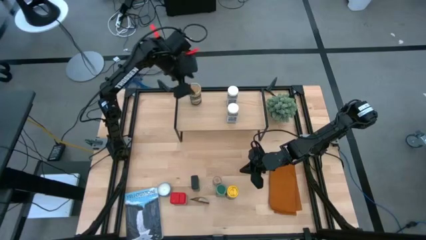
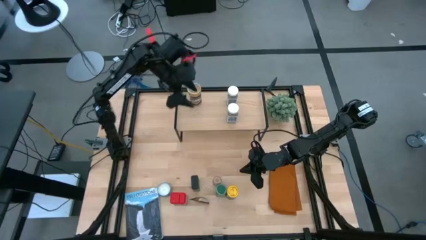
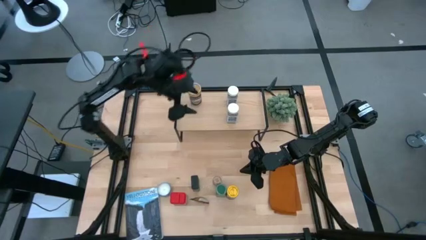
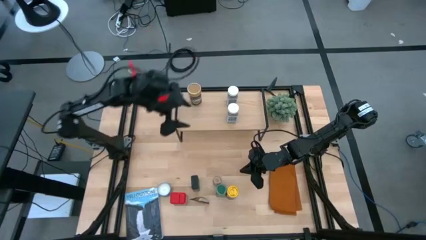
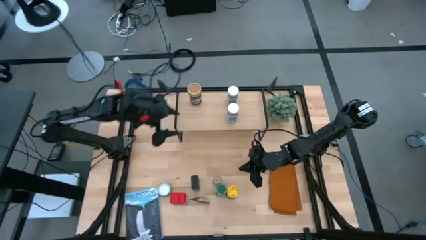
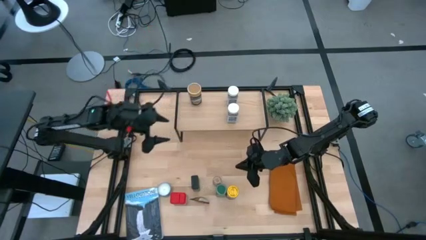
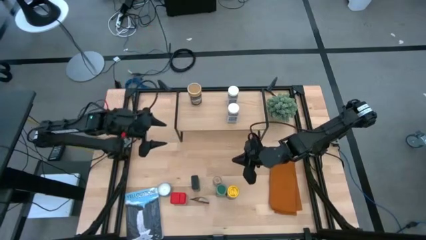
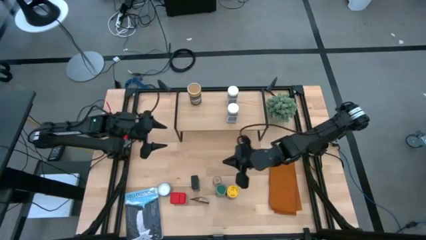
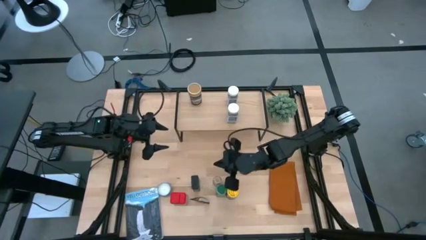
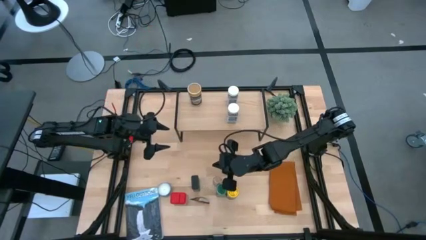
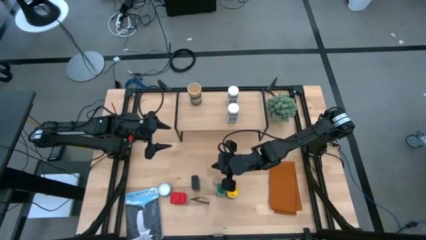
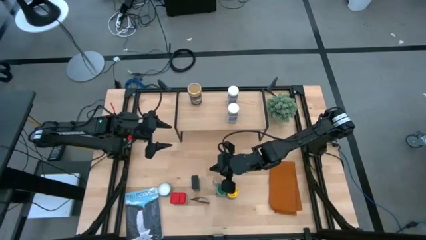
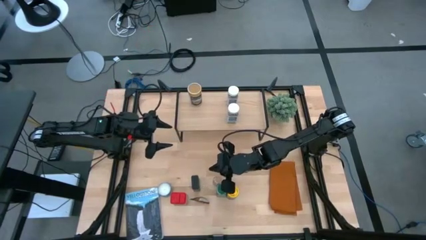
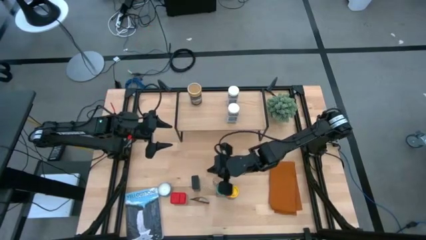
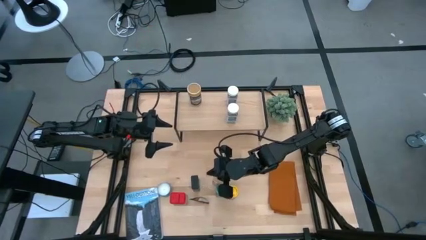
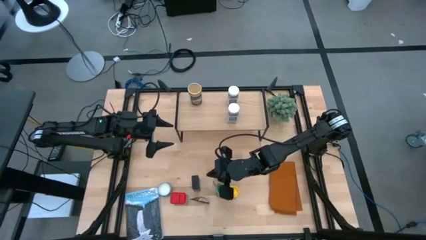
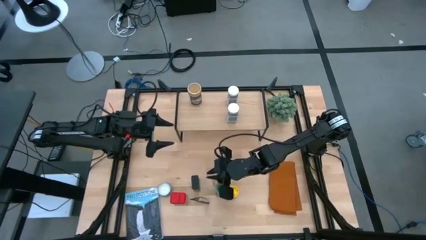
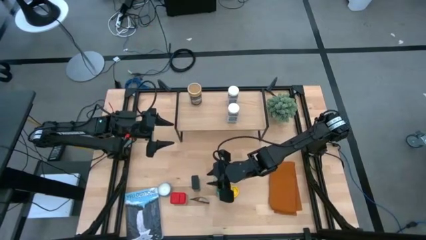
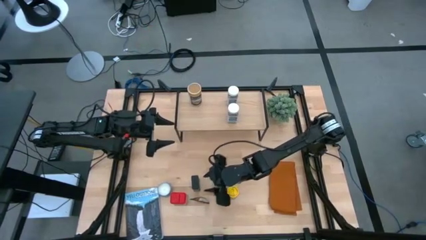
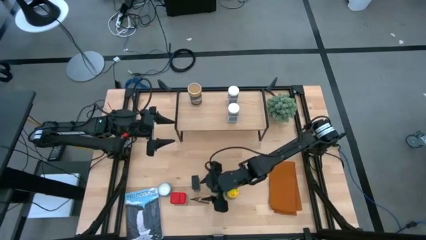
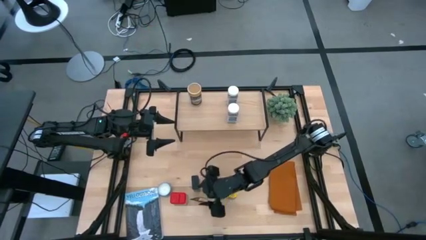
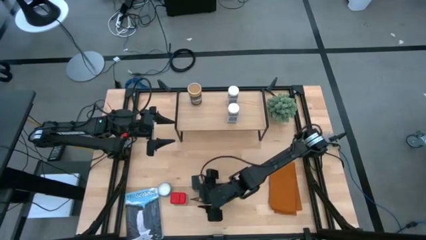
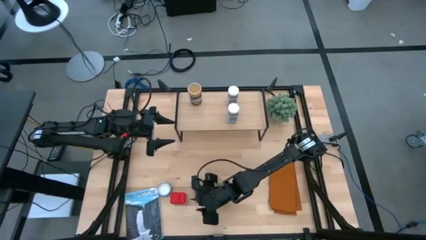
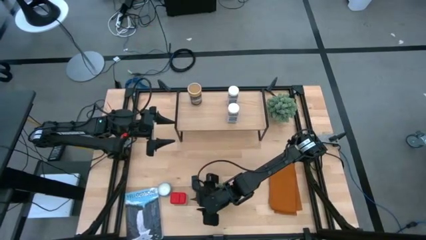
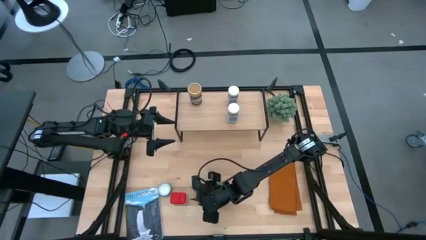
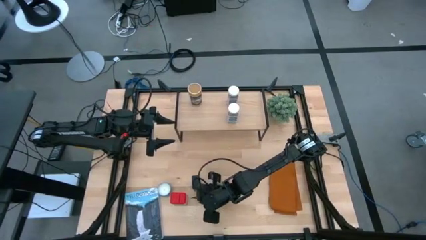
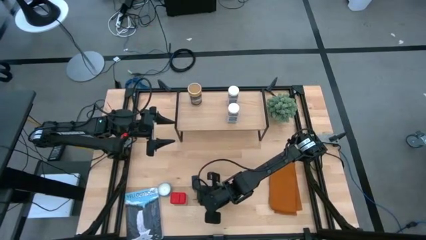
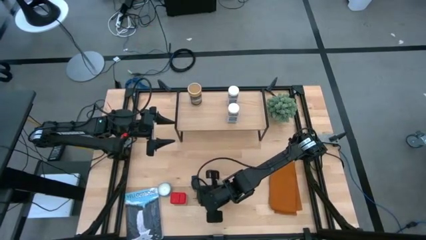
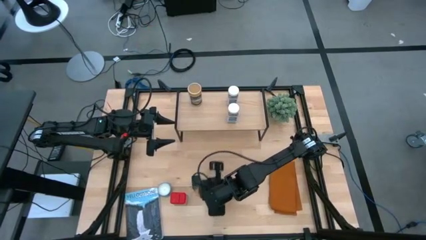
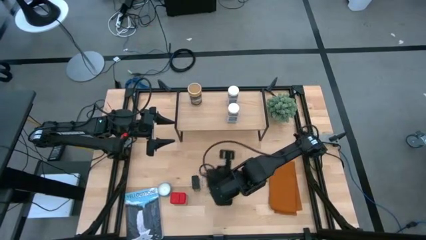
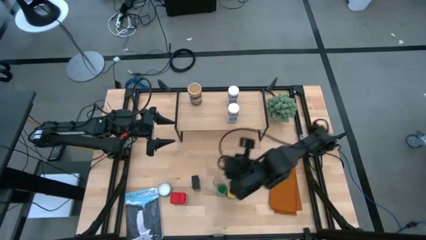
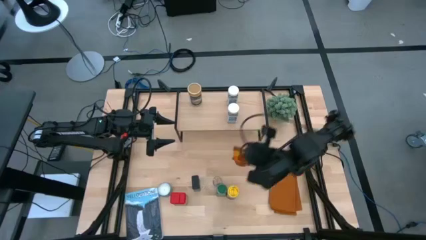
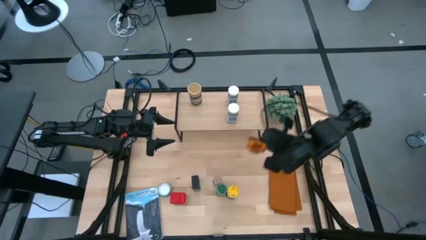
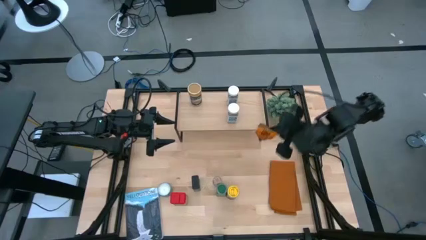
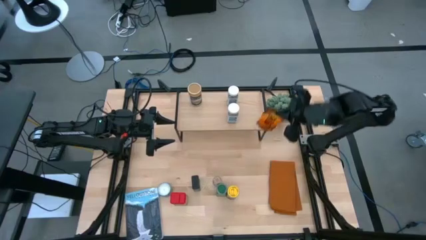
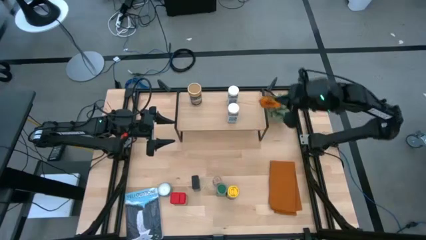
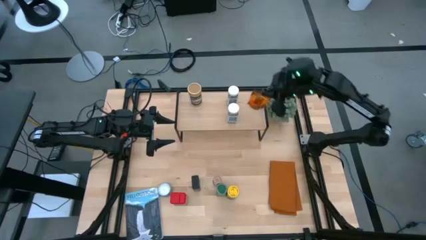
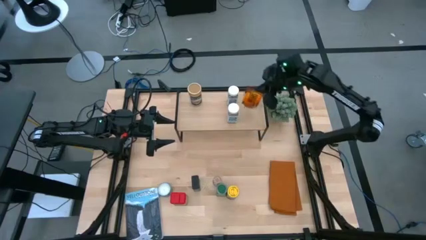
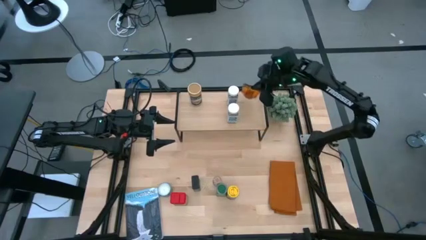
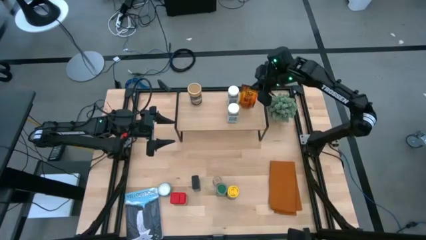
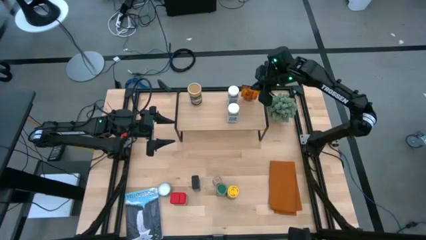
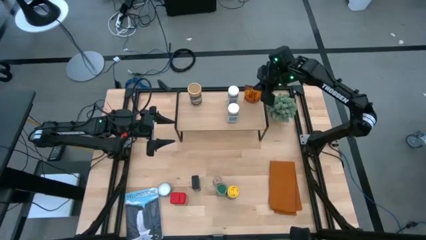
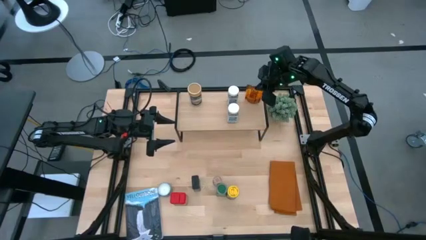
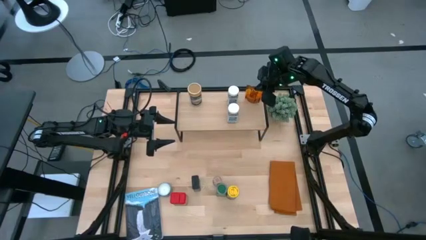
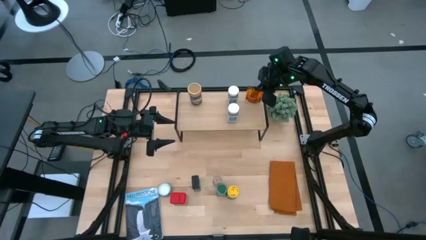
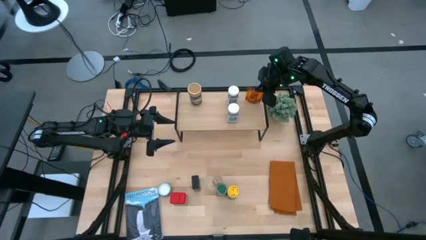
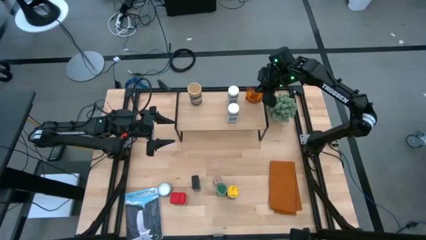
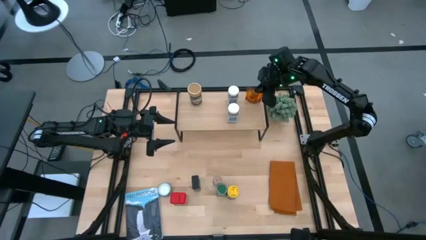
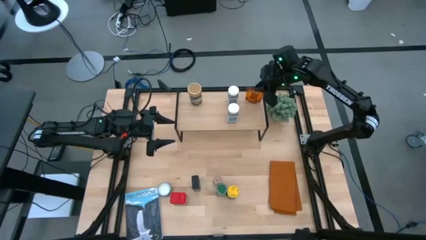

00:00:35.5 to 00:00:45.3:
Task: Shelf spices
Put the orange seasoning pack on the shelf

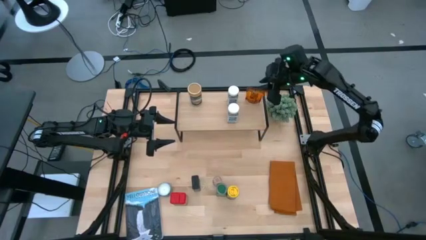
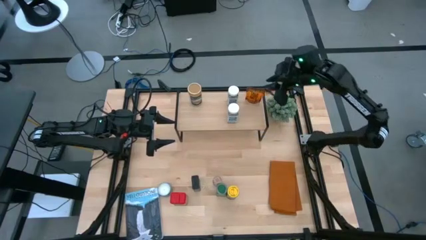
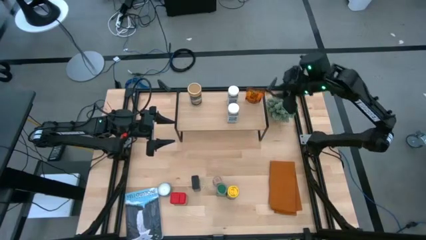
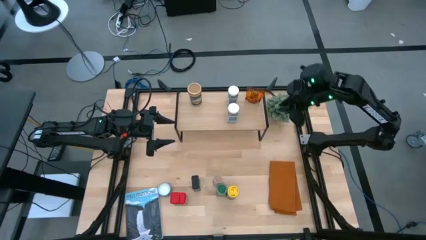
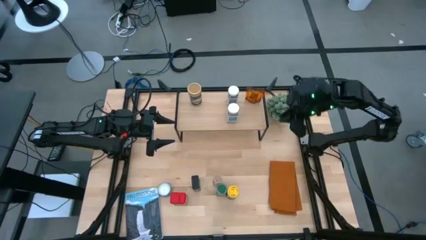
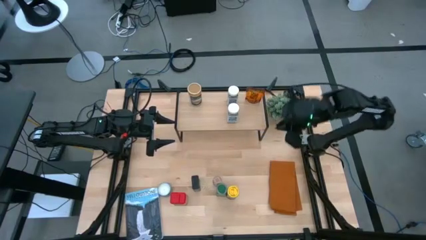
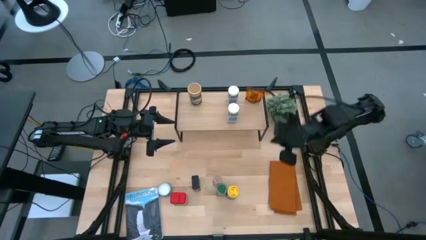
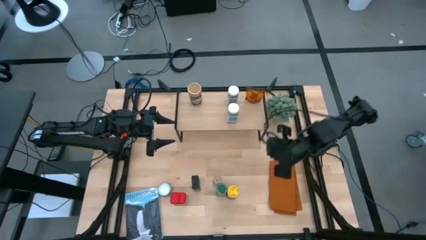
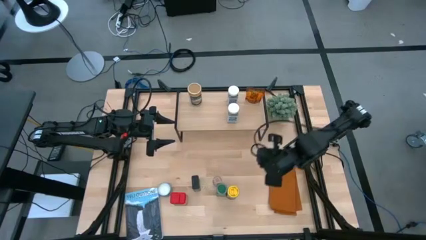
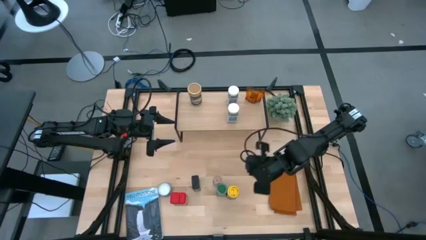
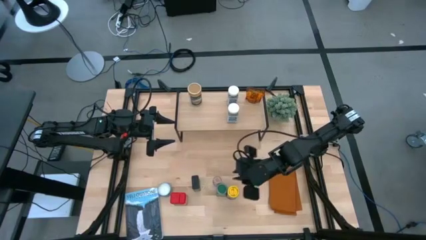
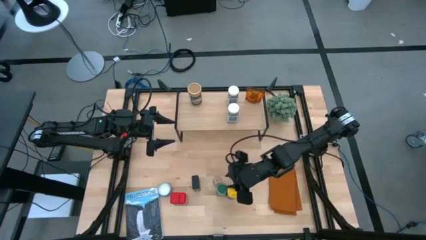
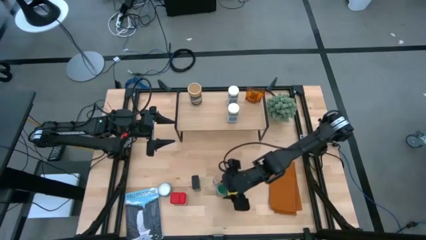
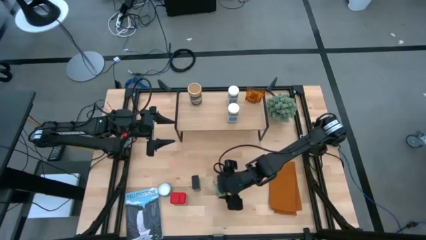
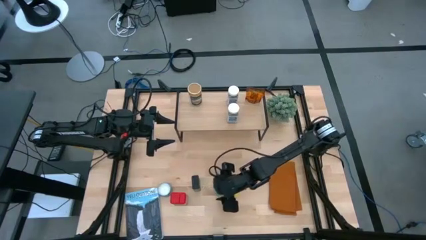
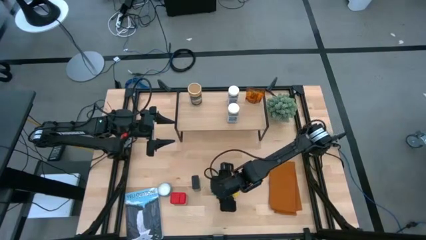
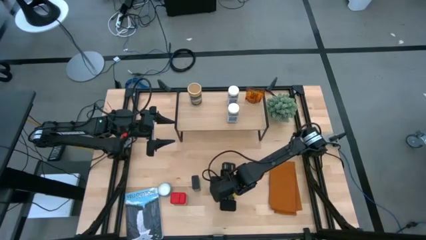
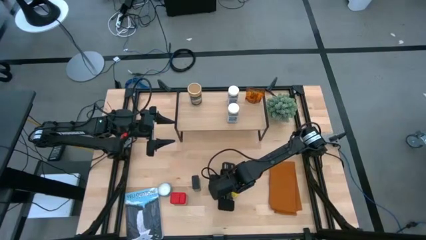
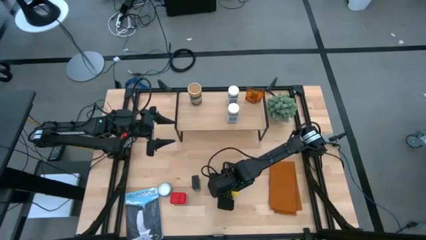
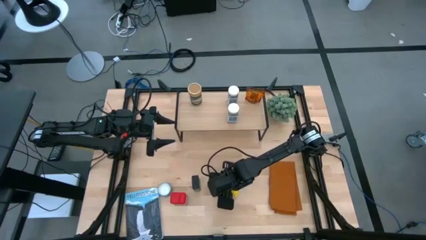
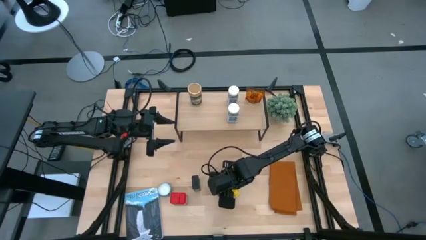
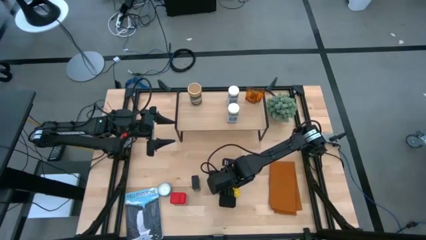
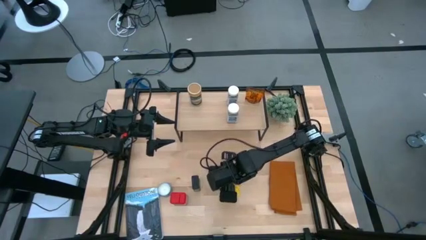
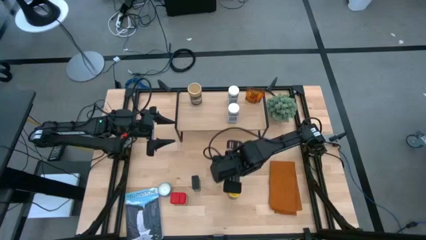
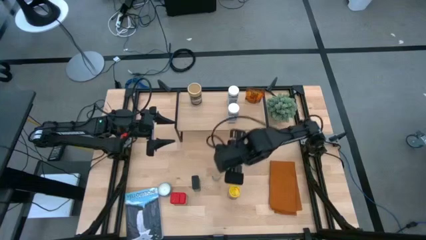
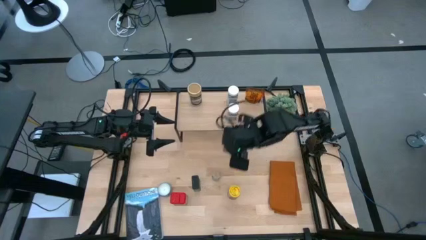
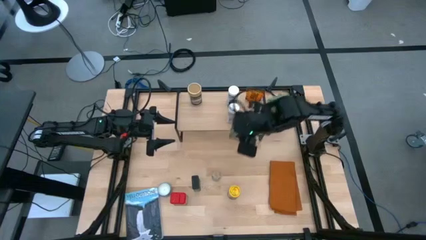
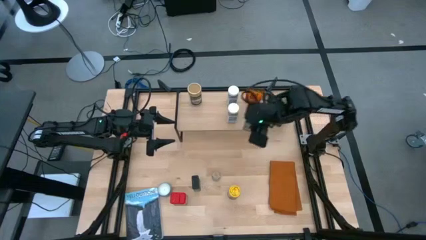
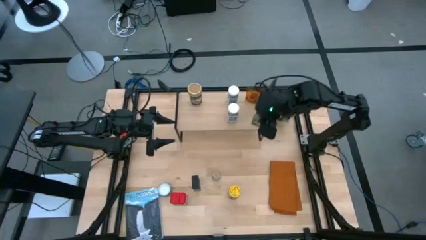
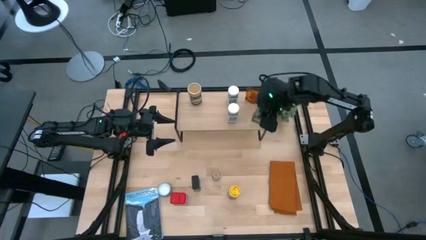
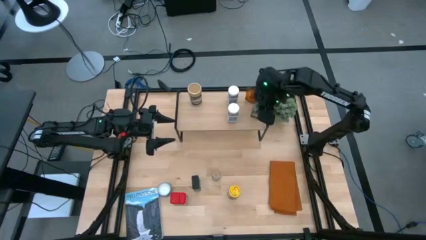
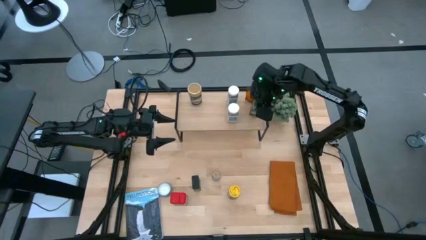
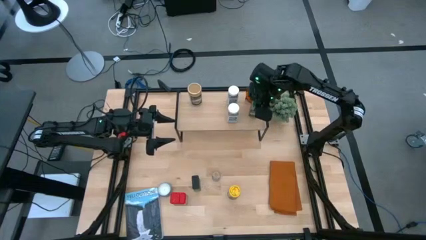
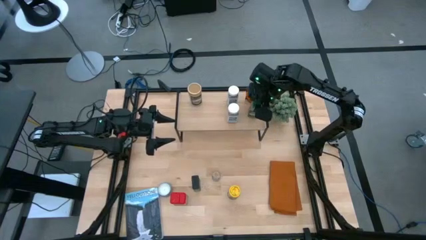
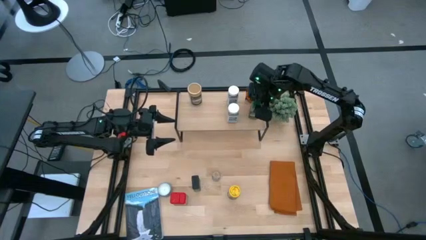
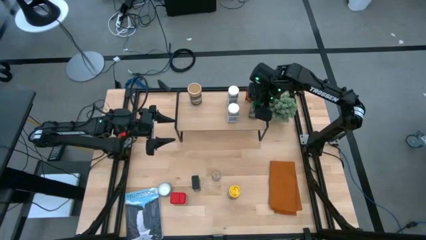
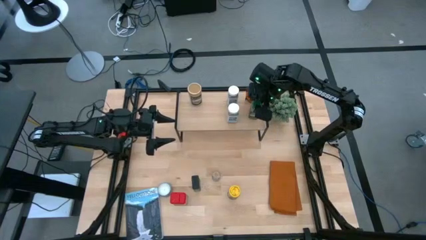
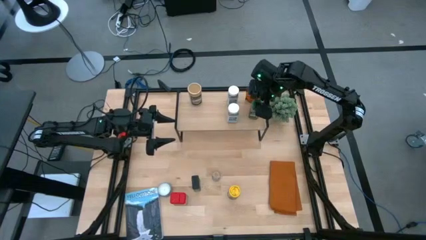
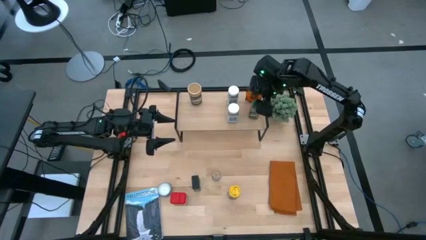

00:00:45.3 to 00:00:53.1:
Put the green seasoning bottle on the shelf
